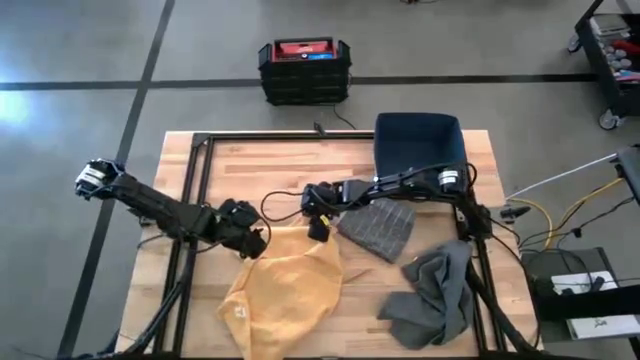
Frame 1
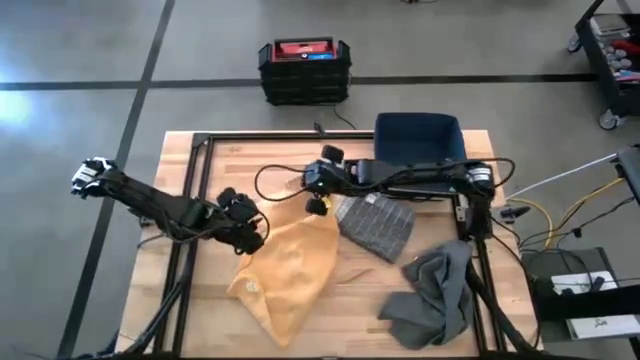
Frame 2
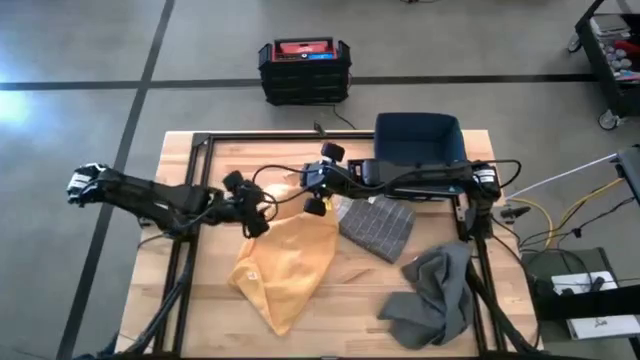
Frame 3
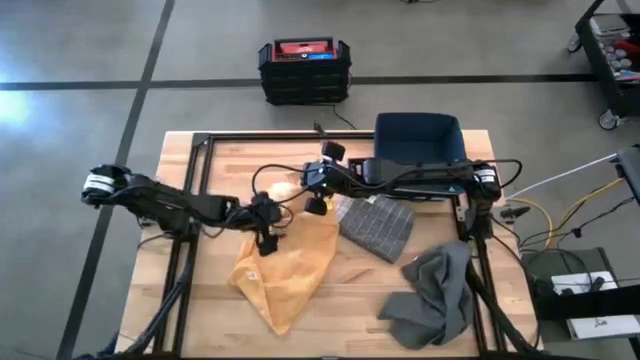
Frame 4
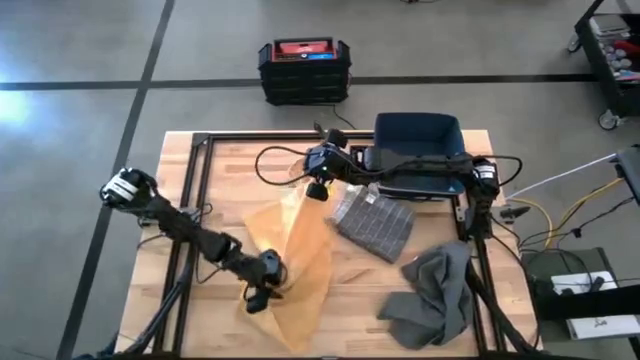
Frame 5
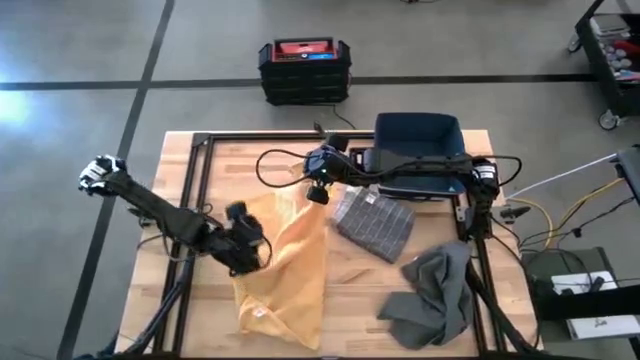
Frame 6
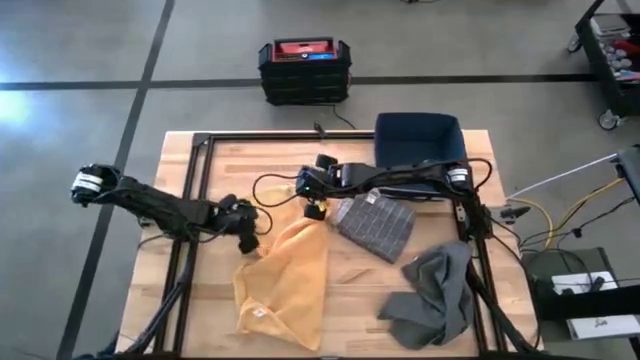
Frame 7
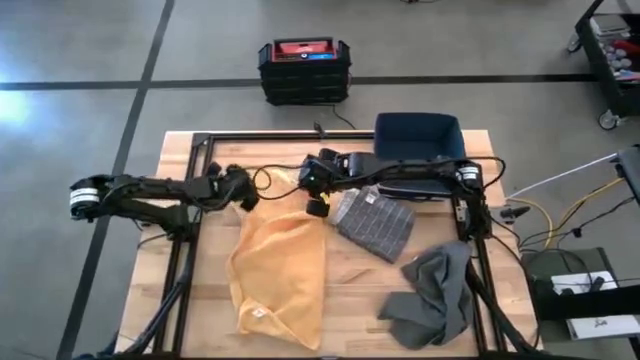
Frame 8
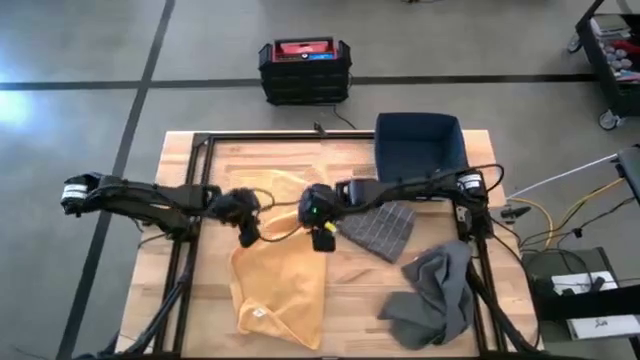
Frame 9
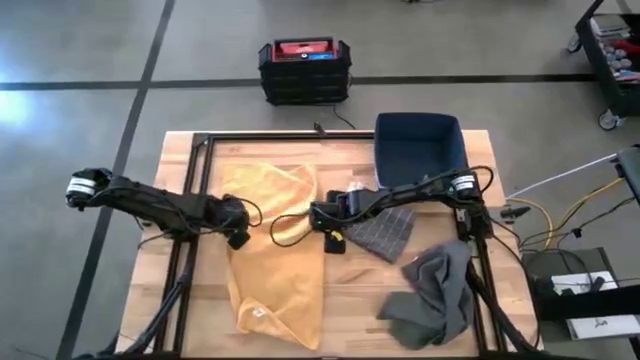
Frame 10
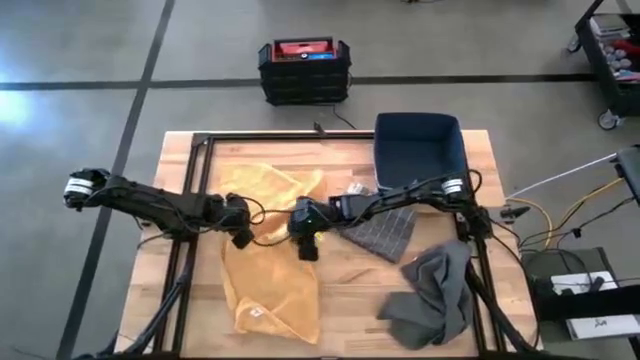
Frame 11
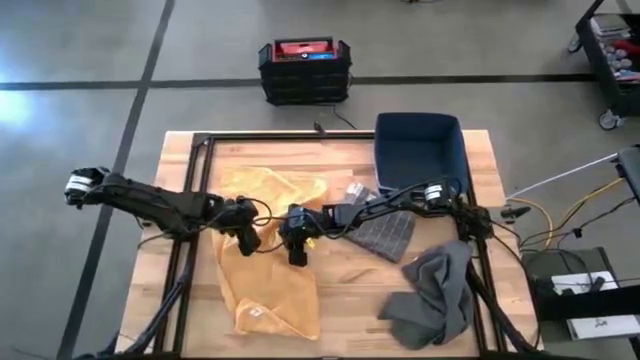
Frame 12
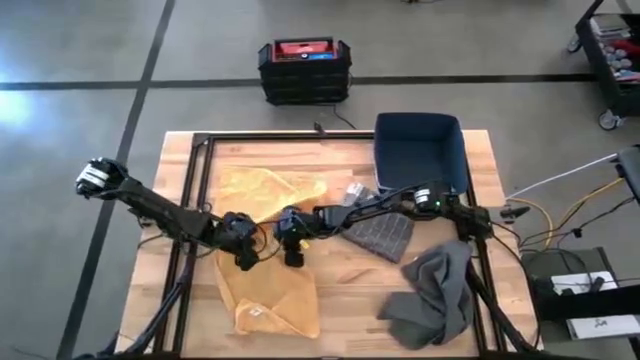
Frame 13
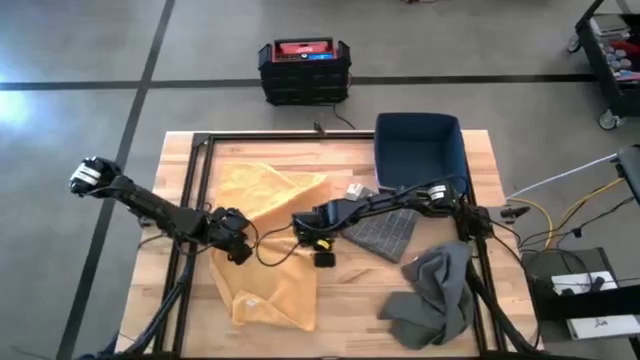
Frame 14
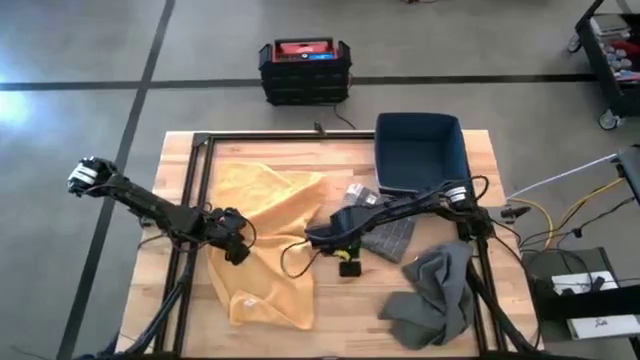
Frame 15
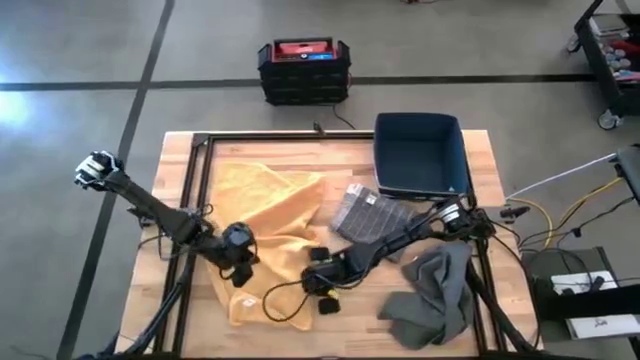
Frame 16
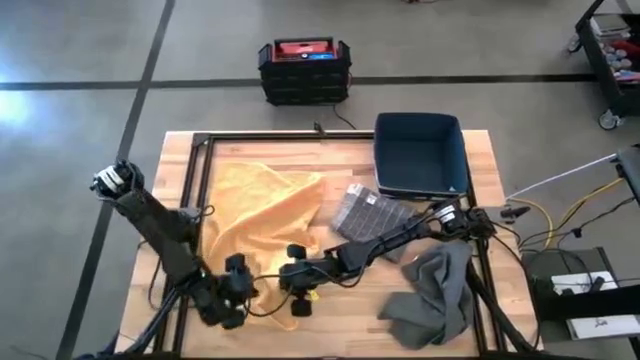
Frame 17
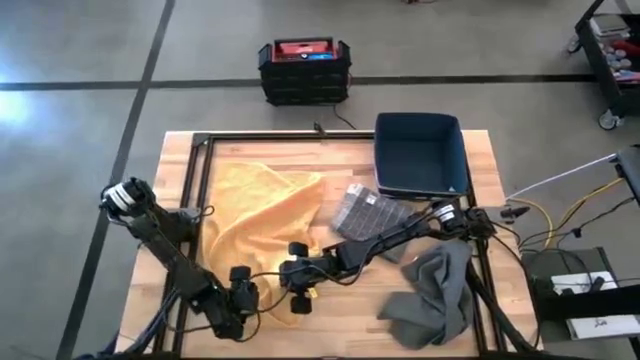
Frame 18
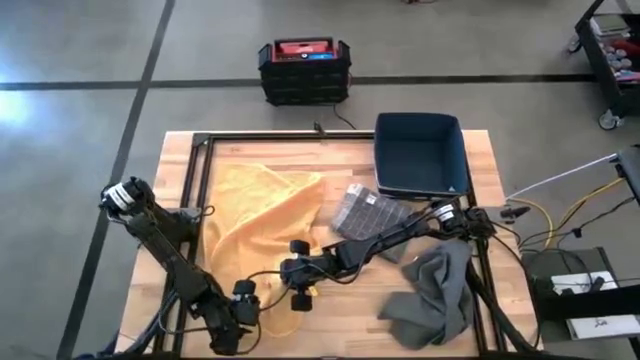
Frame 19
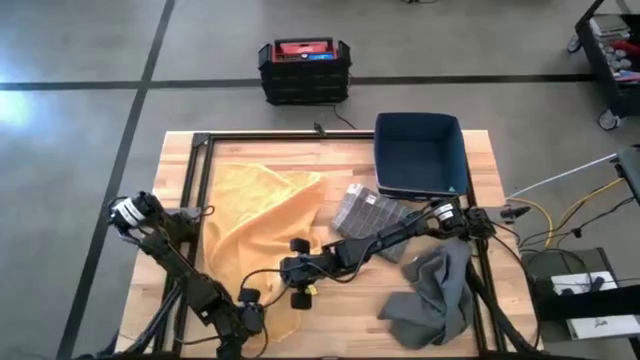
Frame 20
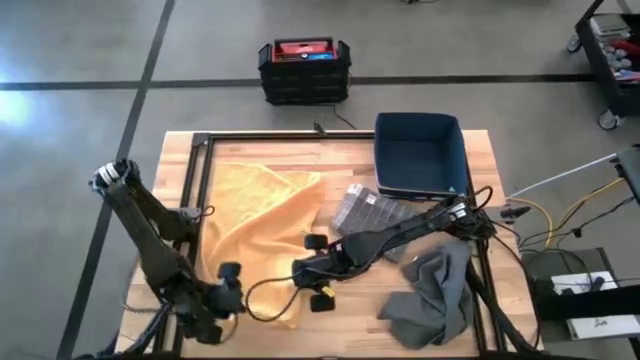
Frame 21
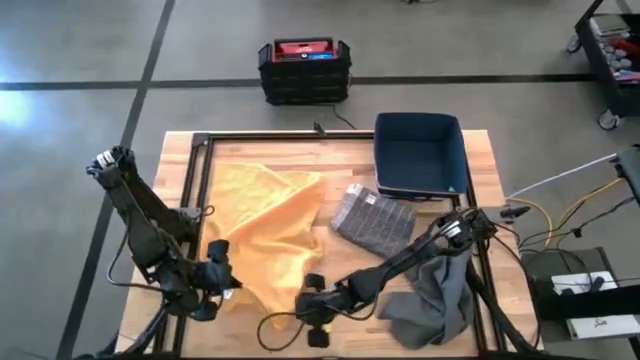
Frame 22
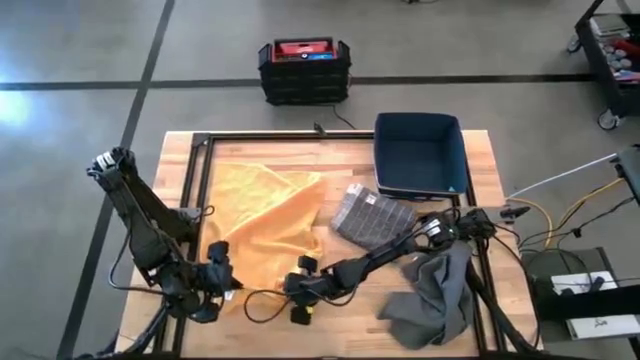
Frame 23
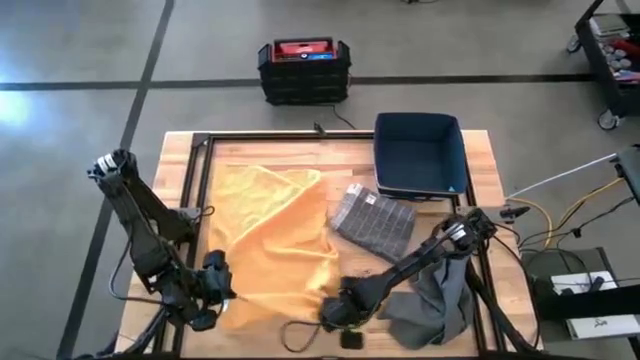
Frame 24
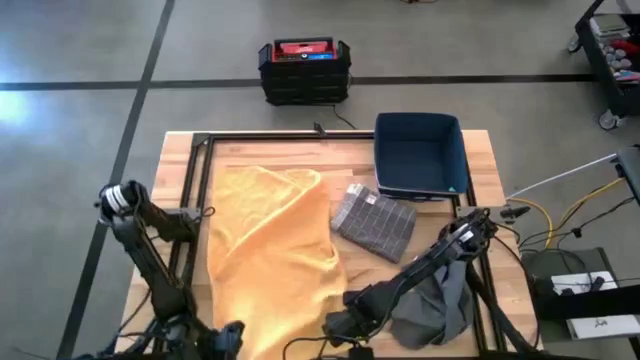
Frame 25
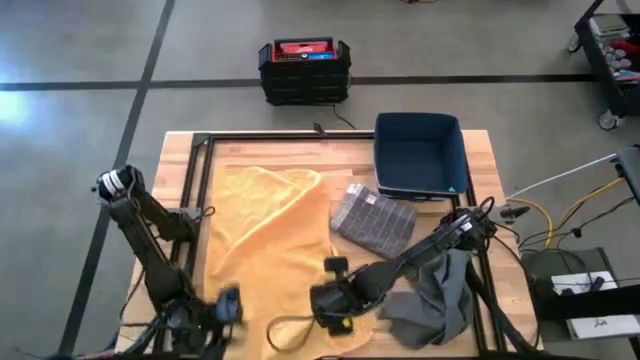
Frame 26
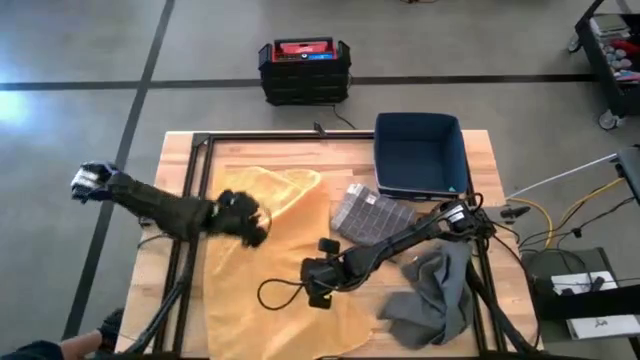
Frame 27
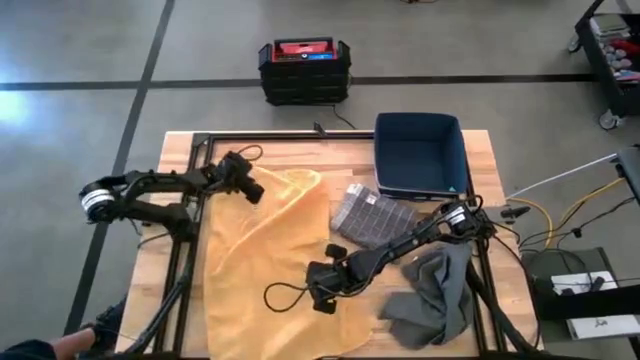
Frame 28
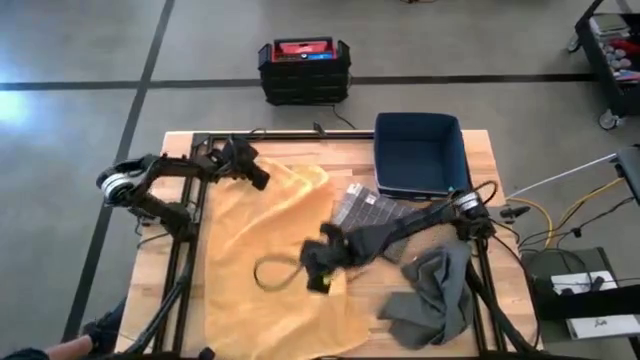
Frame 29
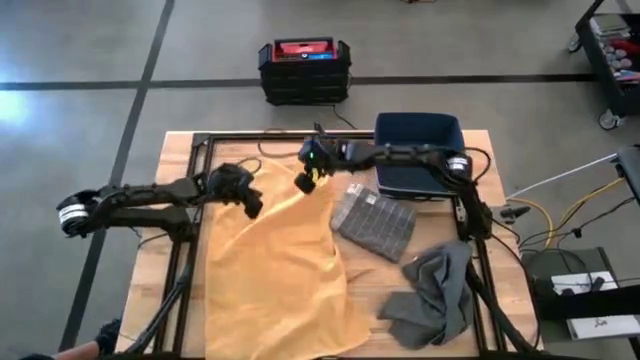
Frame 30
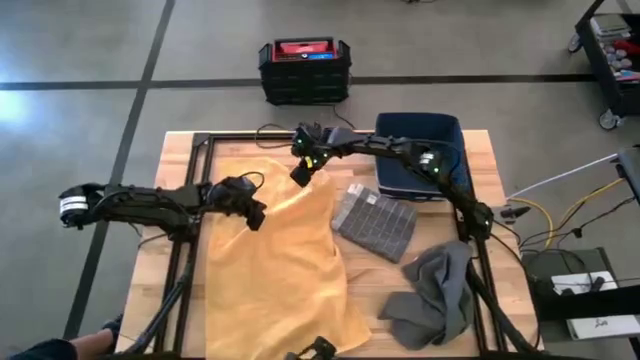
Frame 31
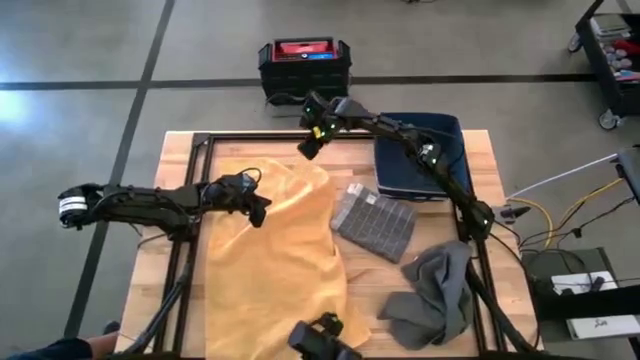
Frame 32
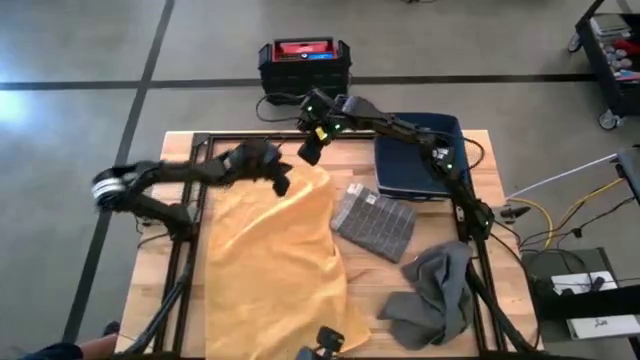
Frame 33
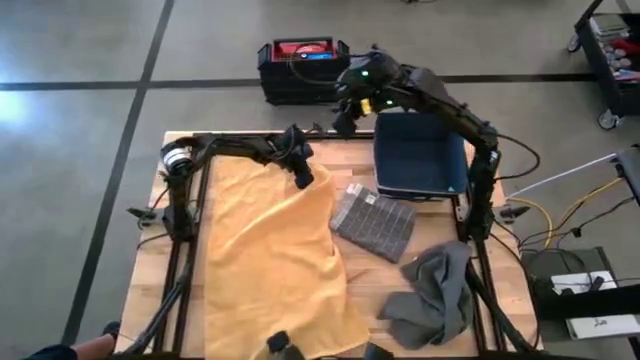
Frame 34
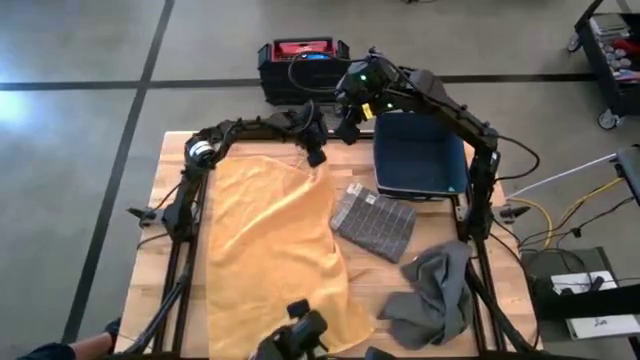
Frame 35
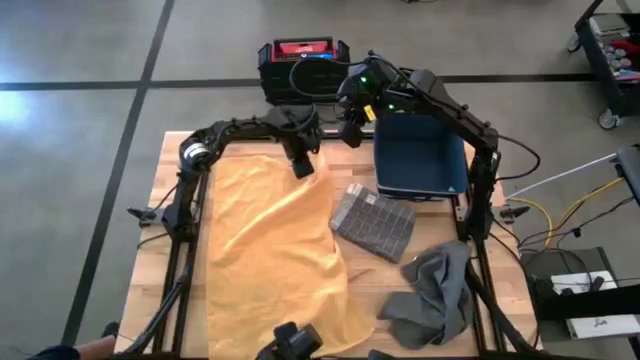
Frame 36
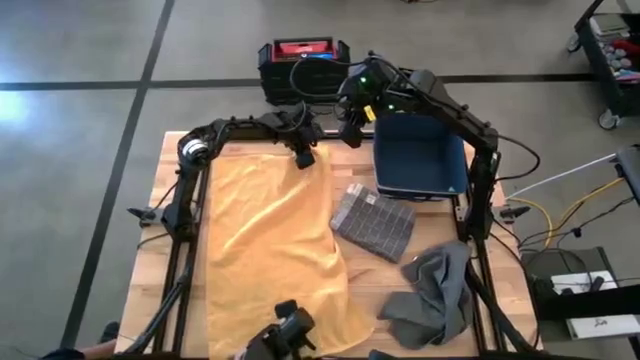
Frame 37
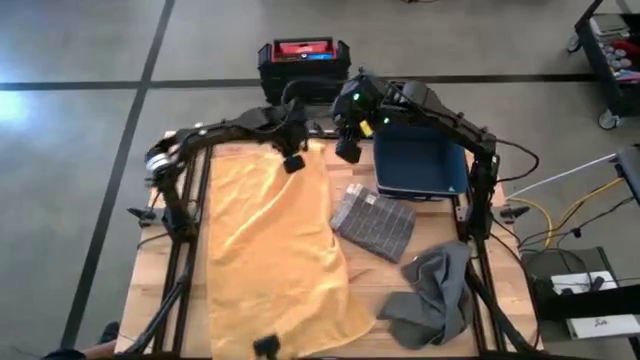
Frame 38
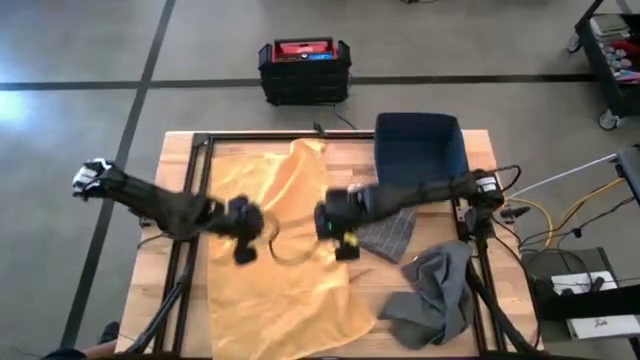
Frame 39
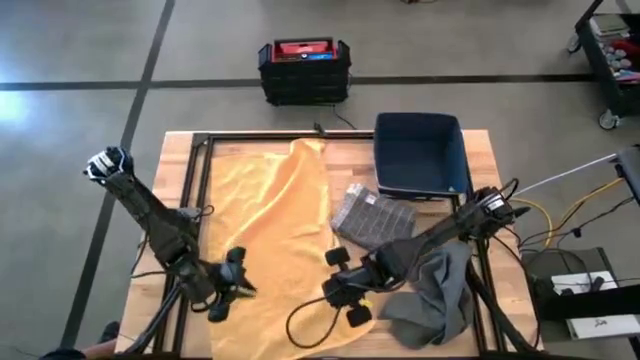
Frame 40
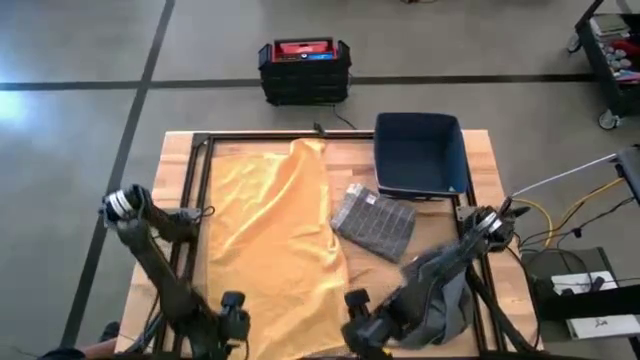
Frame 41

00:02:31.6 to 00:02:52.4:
Task: Fold towel
Fold the yellow kitchen towel
